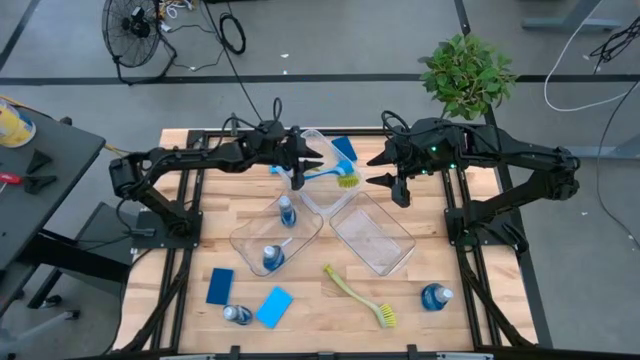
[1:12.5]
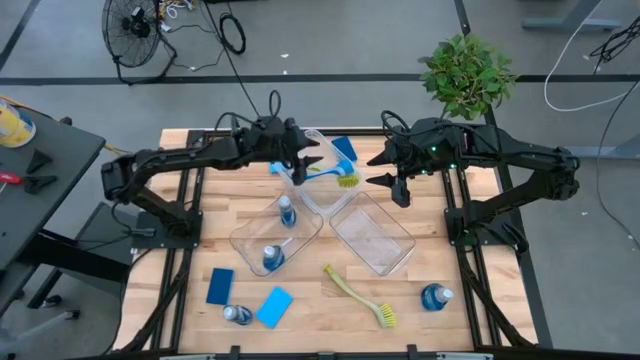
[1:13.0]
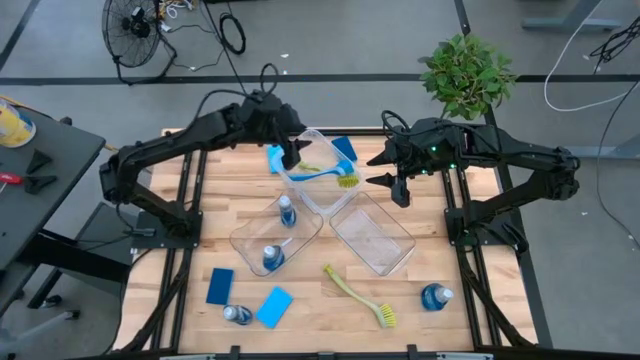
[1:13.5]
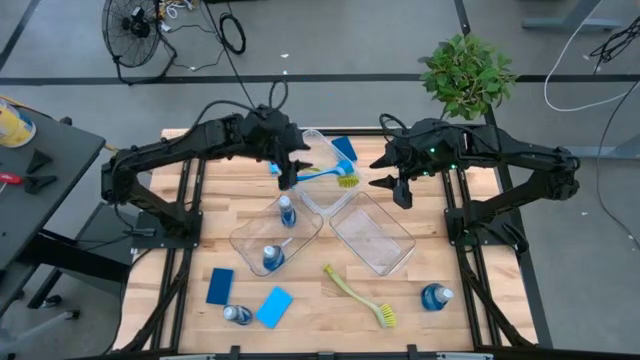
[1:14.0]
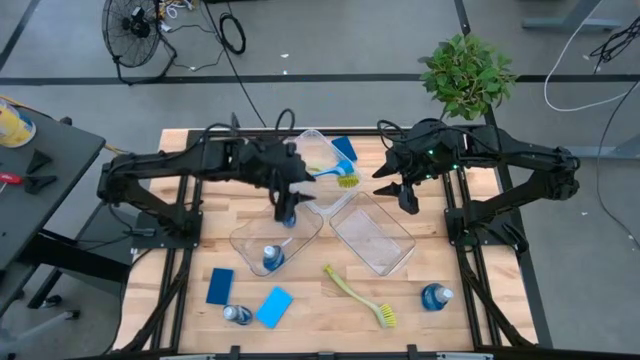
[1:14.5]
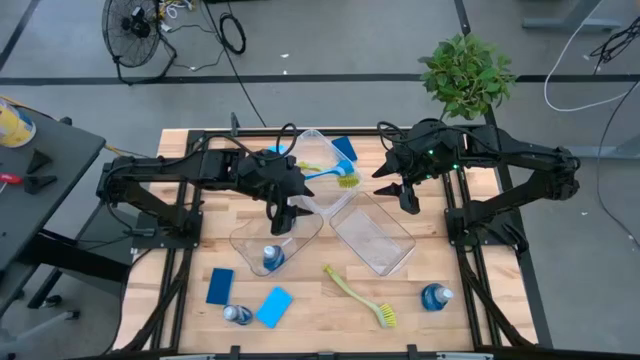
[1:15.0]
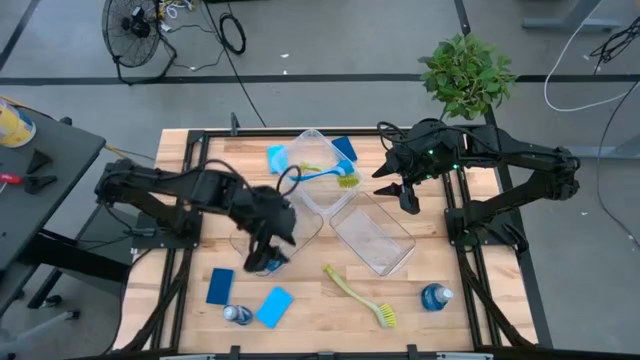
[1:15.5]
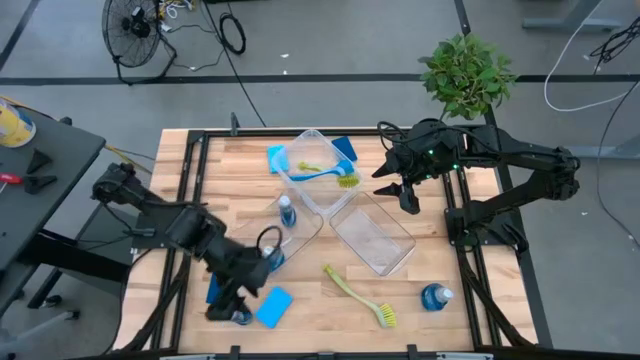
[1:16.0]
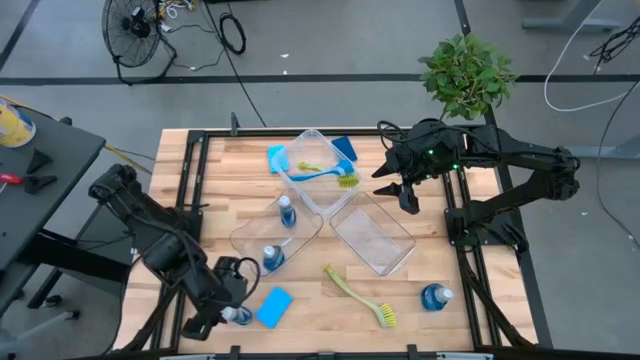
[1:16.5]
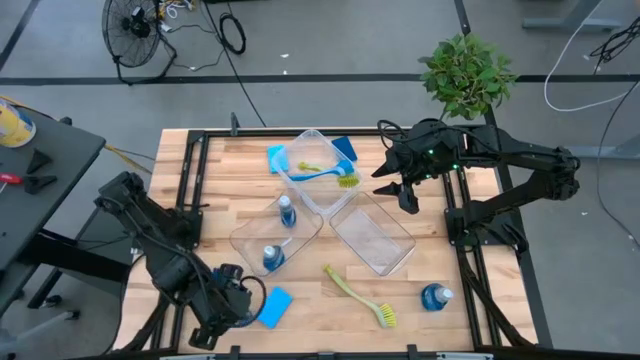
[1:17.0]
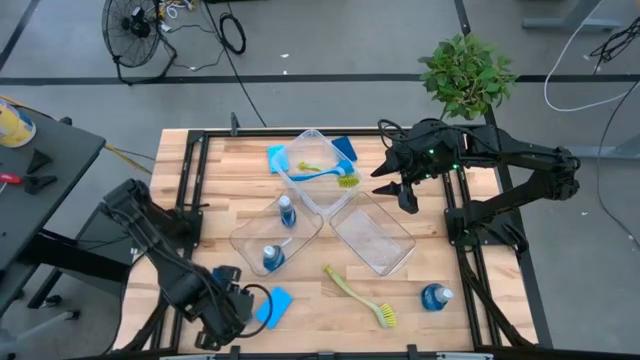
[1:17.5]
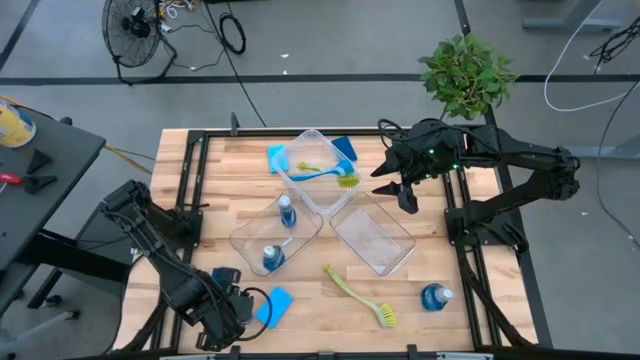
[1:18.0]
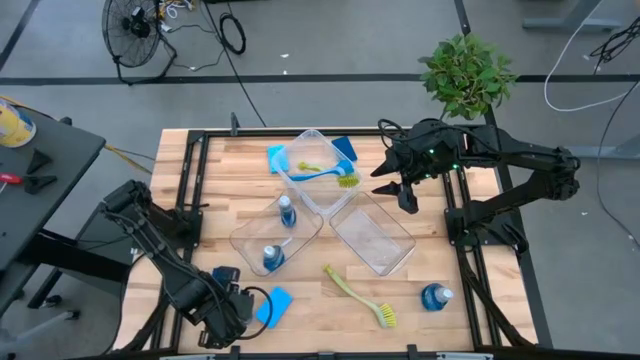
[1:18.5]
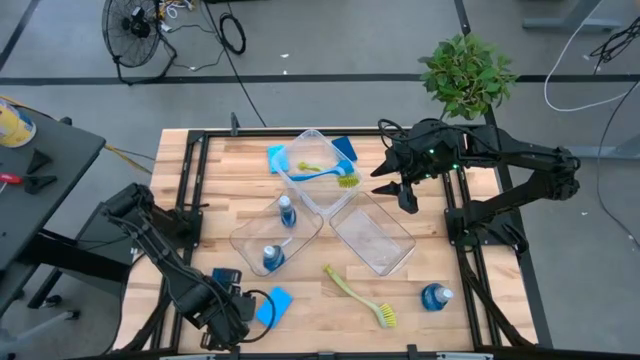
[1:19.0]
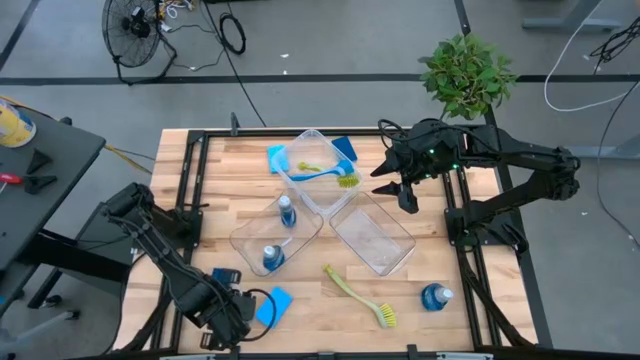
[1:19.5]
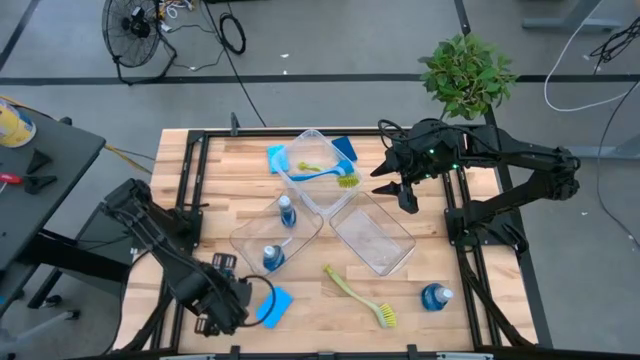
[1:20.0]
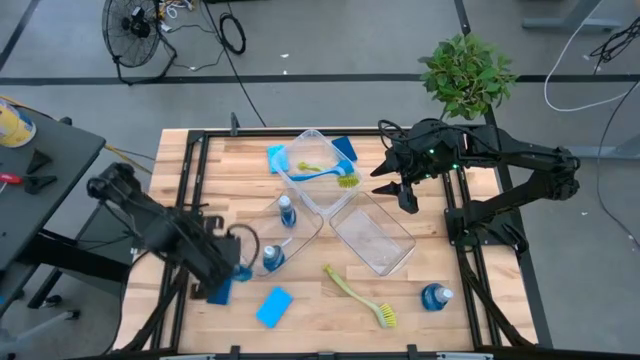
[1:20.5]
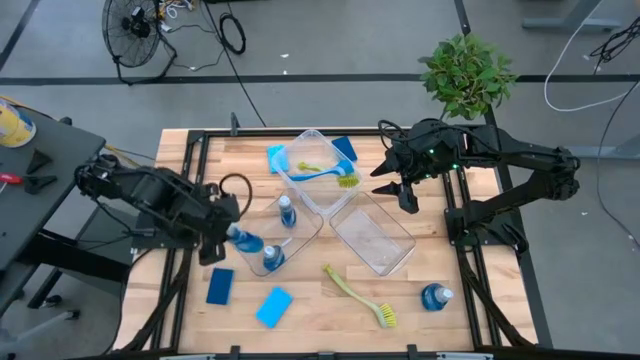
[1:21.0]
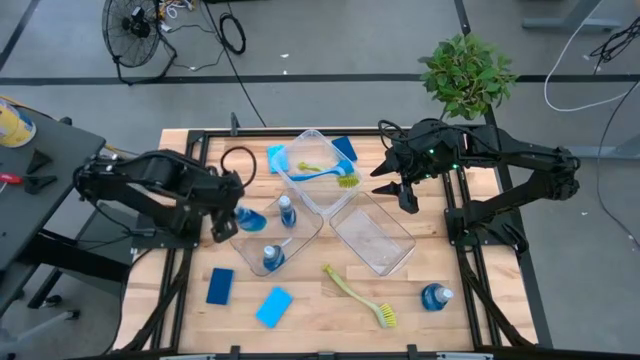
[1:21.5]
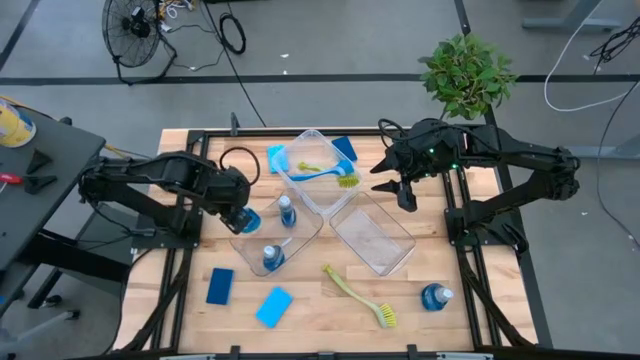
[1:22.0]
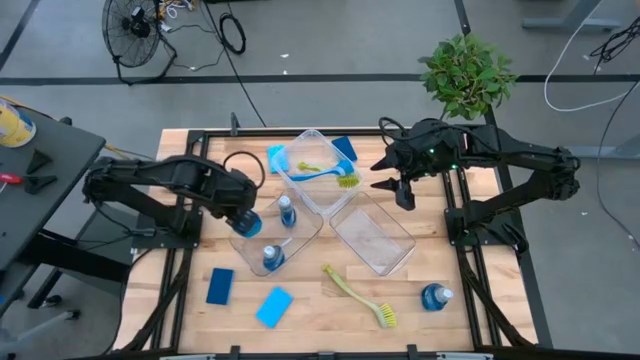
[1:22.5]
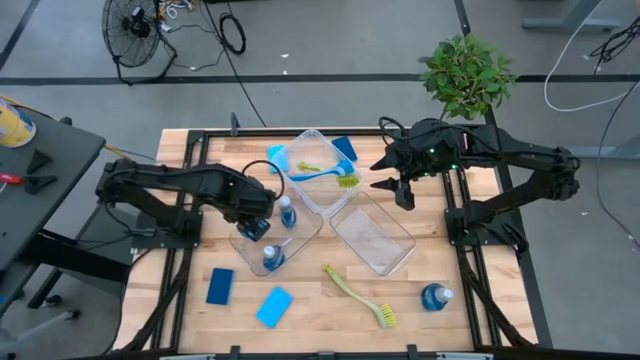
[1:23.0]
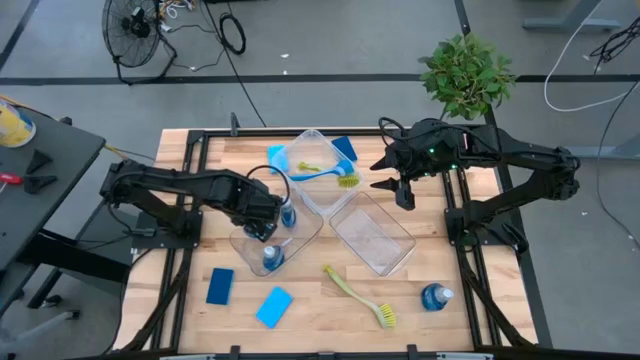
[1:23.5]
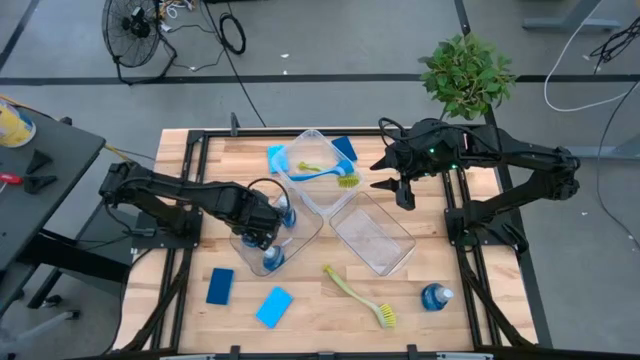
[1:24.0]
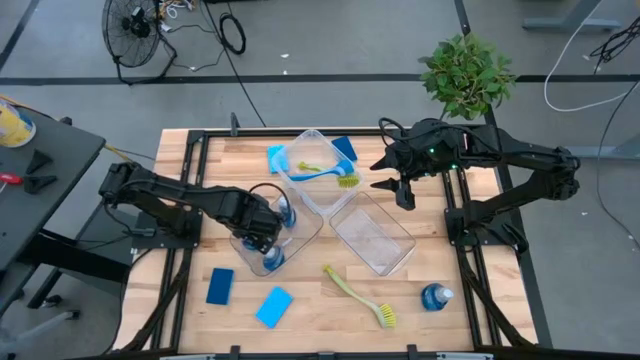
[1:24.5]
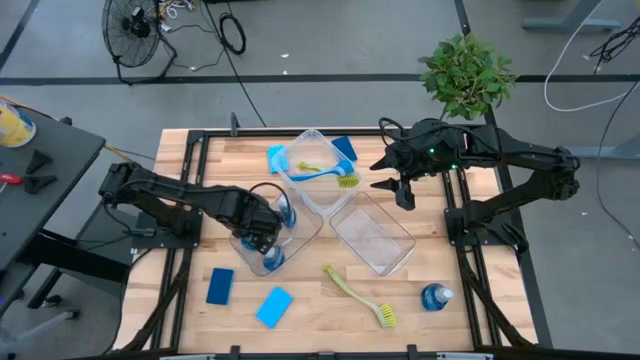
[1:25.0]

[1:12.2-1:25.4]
Task: Pick & Place Kitchen Sink Supplies
Put the blue dishwashing liquid into the left transparent bin

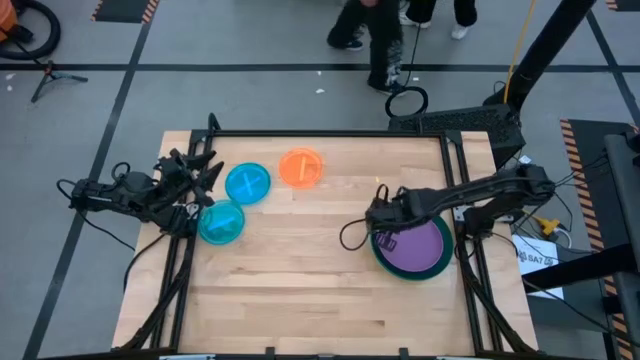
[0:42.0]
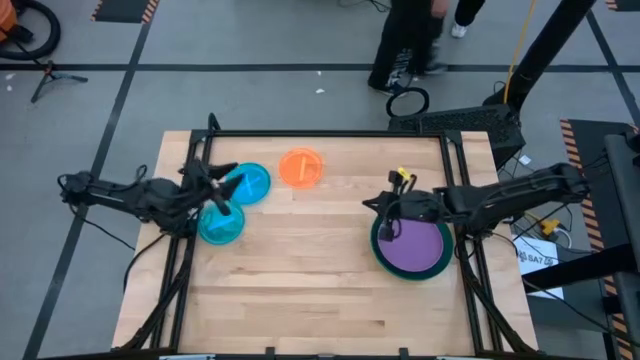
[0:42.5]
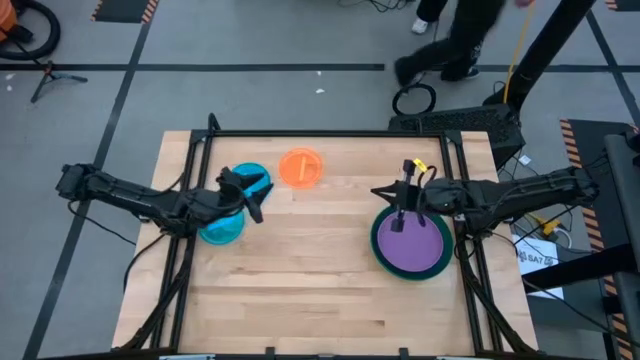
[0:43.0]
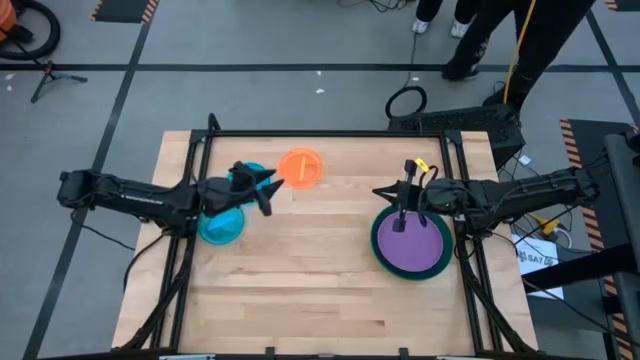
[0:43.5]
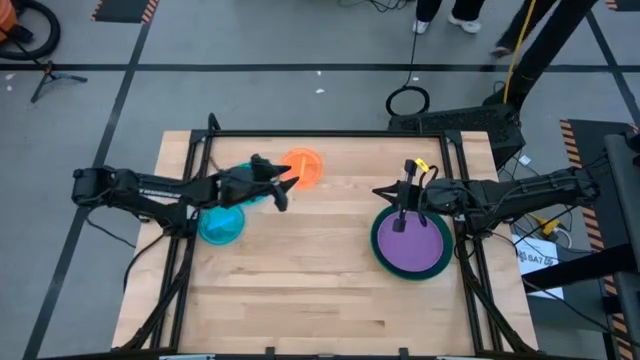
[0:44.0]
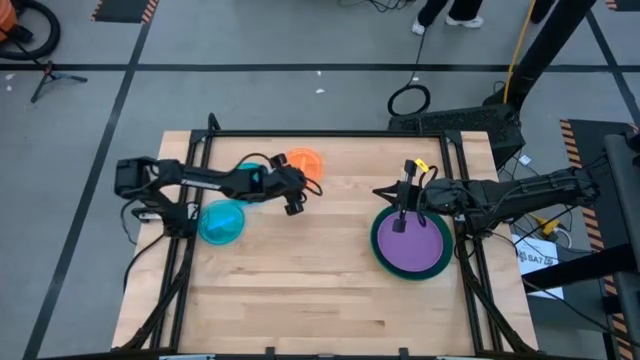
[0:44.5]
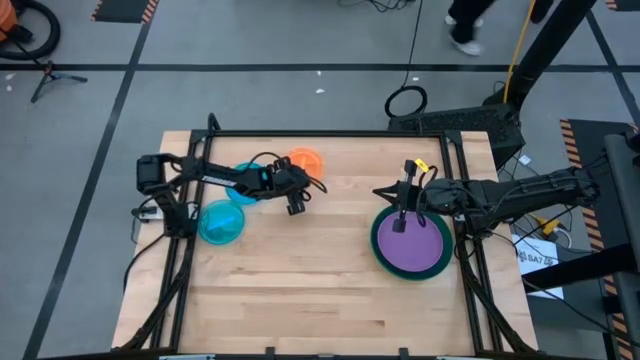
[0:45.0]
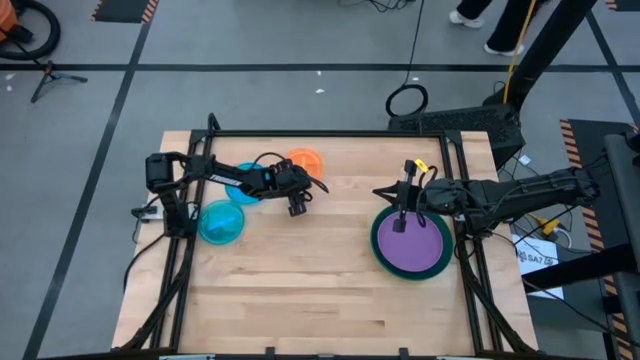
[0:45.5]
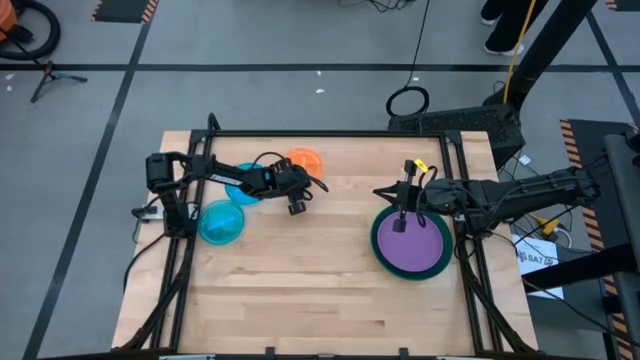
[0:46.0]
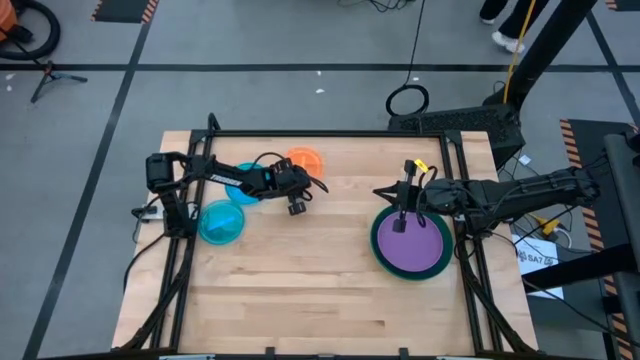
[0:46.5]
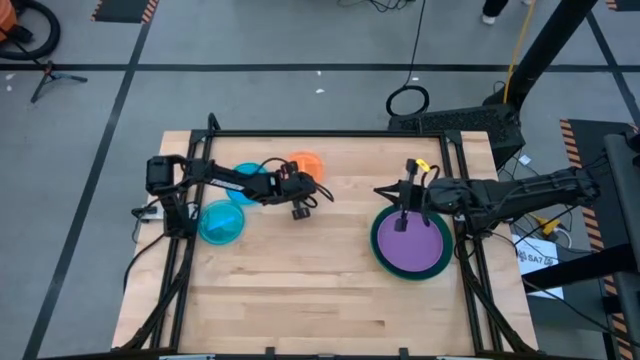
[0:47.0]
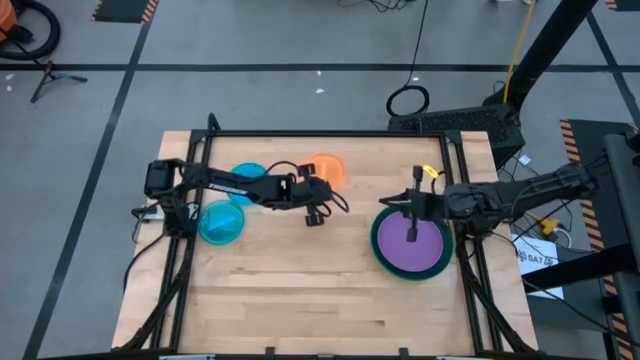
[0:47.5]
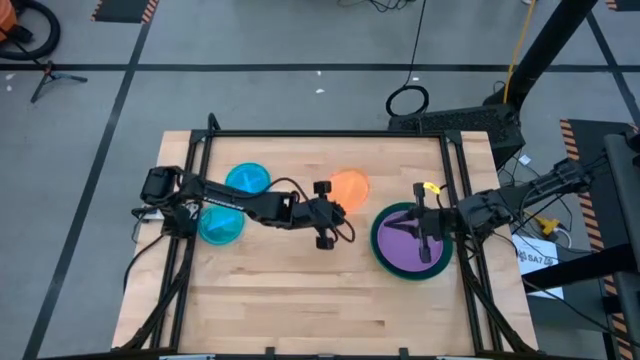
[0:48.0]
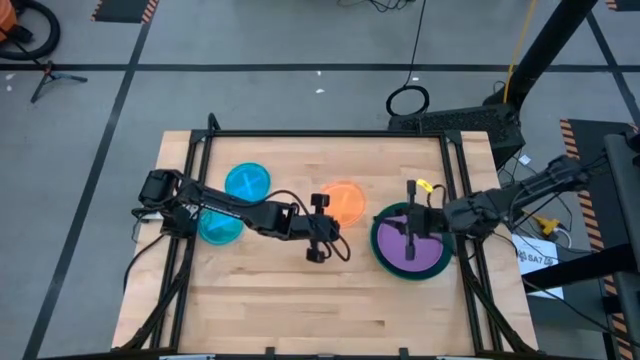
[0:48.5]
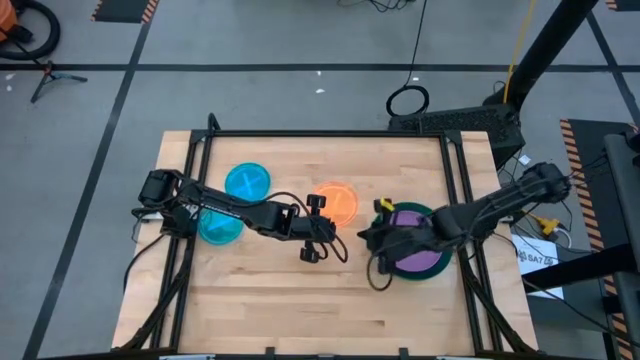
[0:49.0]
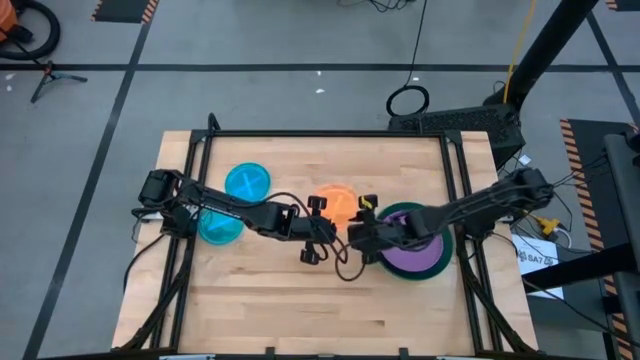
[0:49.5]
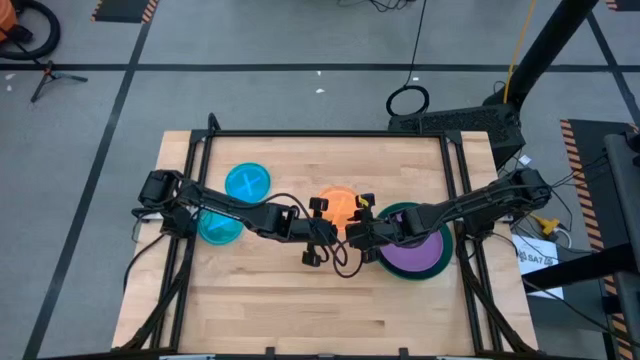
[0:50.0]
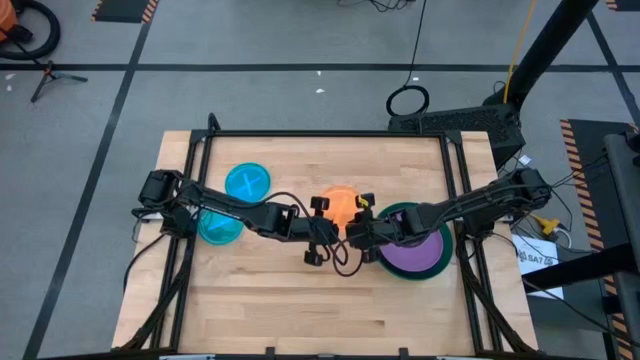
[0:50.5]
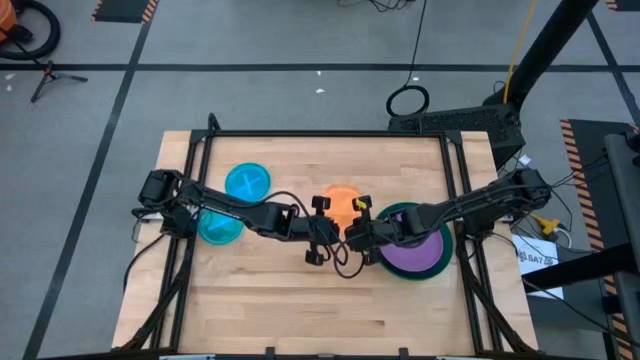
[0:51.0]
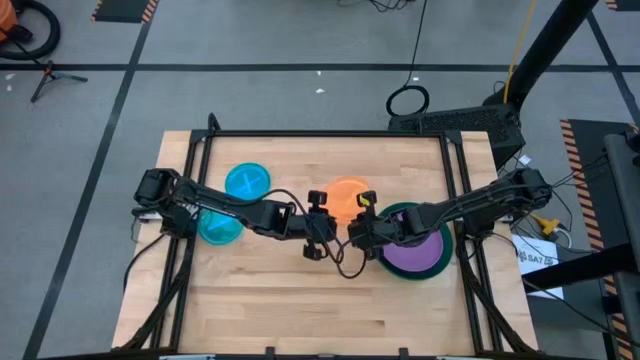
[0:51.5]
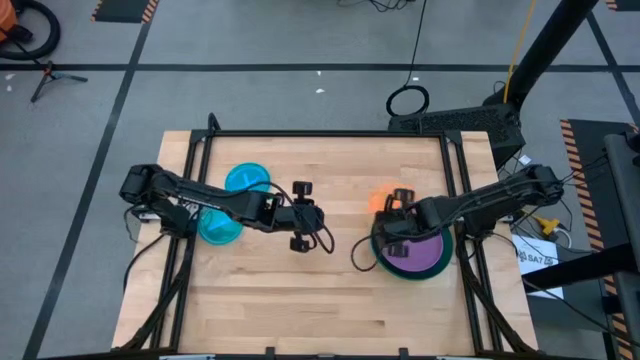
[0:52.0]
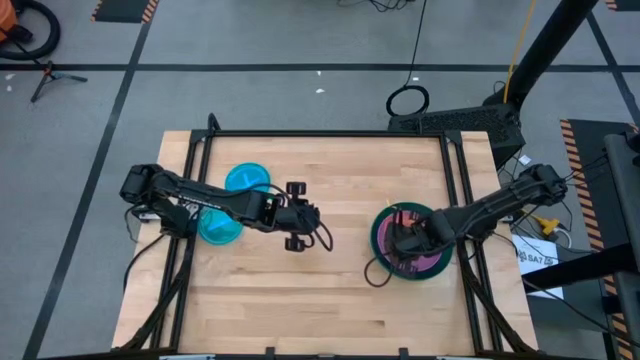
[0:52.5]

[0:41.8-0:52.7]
Task: Stack plastic plates
Stack the orange plate on top of the purple plate
